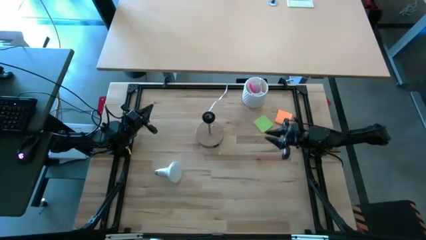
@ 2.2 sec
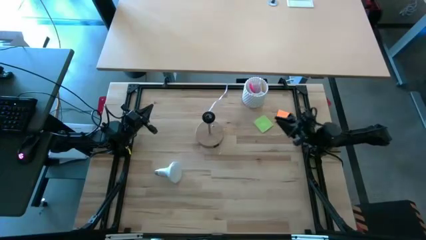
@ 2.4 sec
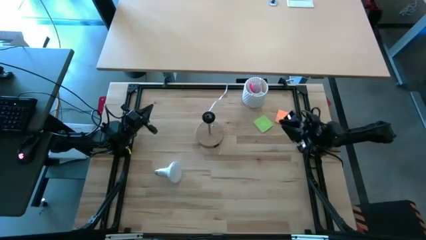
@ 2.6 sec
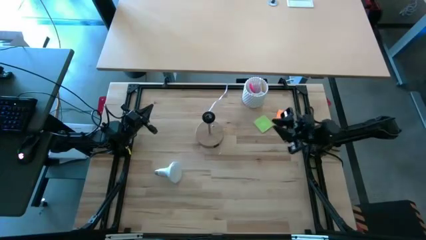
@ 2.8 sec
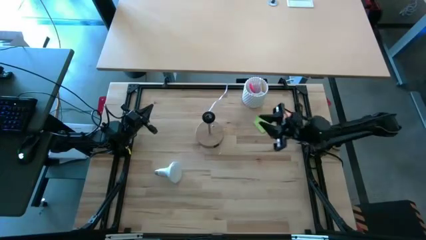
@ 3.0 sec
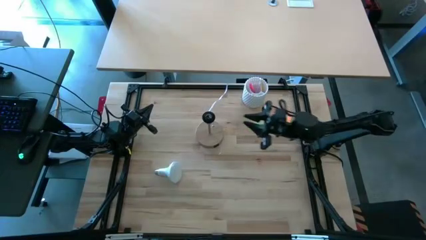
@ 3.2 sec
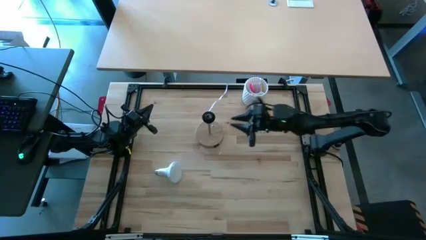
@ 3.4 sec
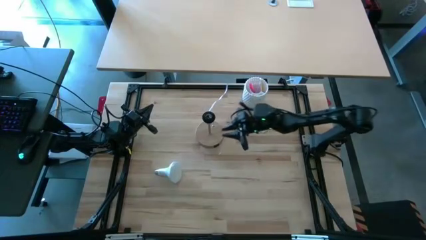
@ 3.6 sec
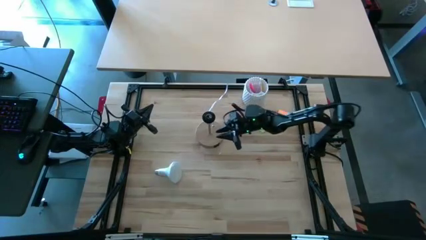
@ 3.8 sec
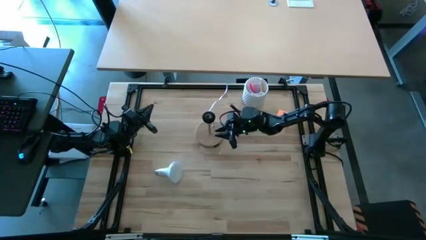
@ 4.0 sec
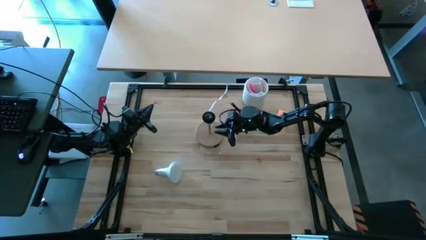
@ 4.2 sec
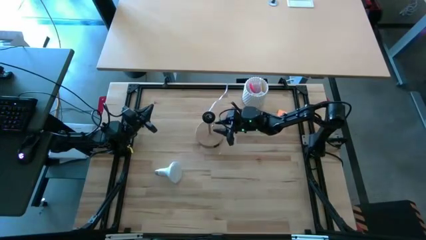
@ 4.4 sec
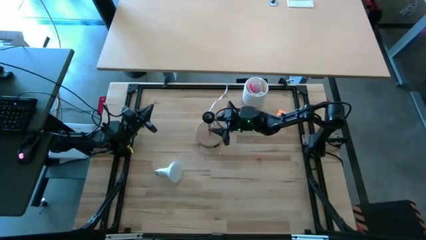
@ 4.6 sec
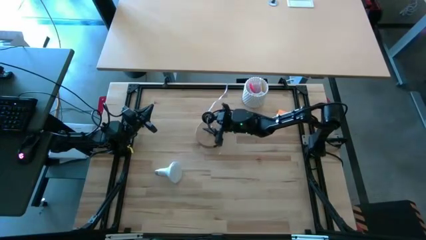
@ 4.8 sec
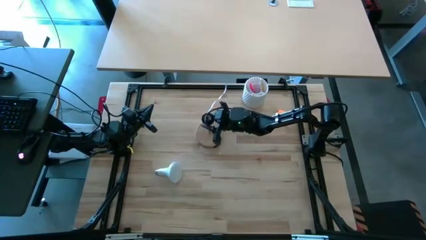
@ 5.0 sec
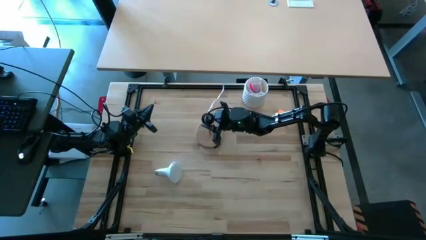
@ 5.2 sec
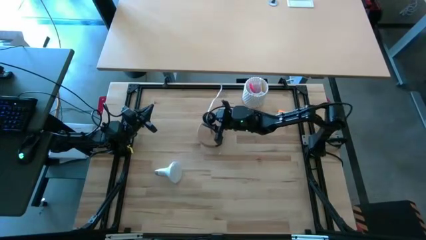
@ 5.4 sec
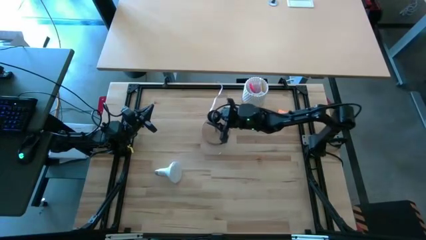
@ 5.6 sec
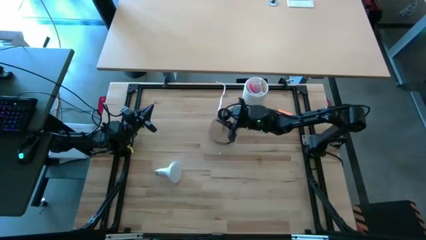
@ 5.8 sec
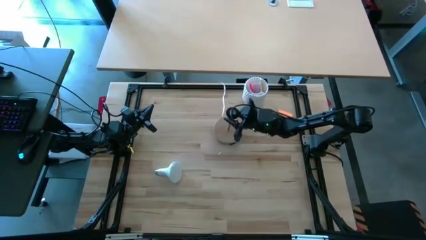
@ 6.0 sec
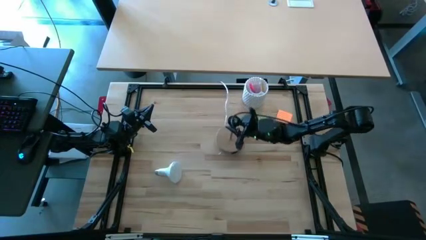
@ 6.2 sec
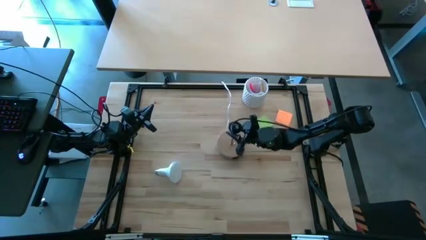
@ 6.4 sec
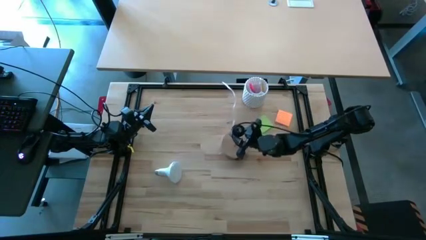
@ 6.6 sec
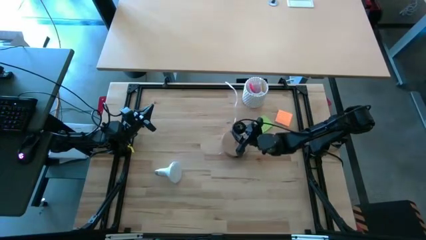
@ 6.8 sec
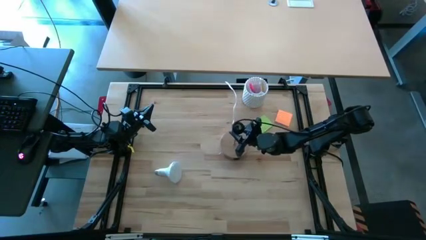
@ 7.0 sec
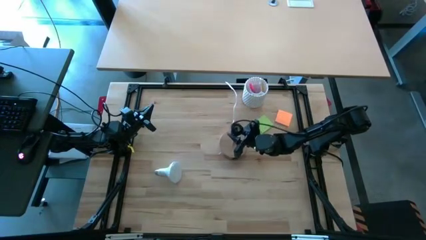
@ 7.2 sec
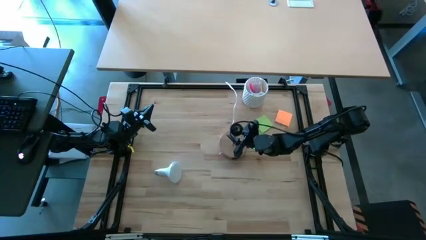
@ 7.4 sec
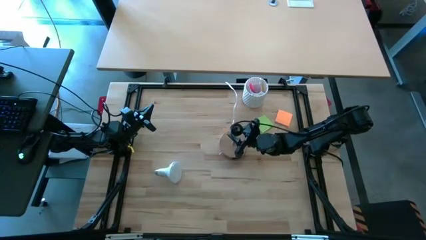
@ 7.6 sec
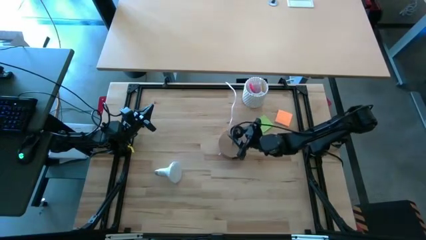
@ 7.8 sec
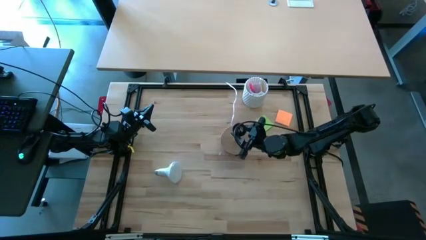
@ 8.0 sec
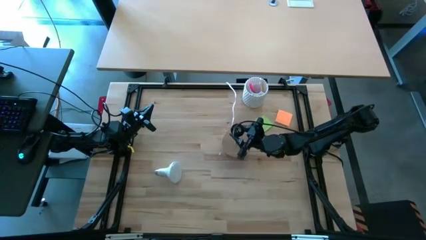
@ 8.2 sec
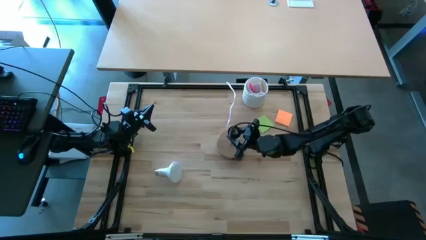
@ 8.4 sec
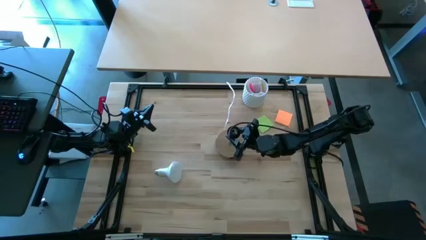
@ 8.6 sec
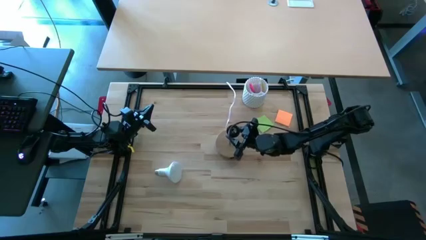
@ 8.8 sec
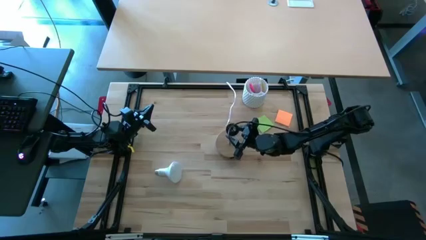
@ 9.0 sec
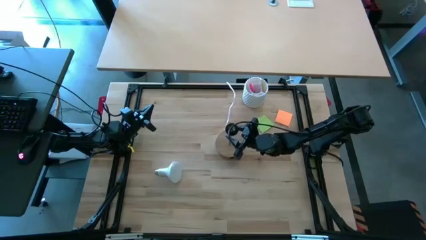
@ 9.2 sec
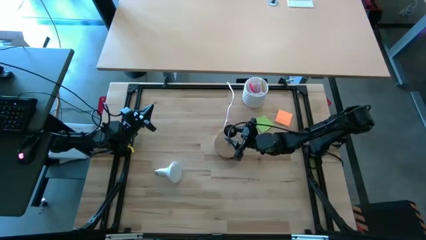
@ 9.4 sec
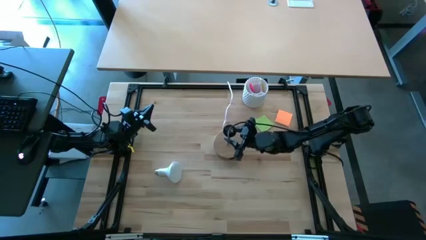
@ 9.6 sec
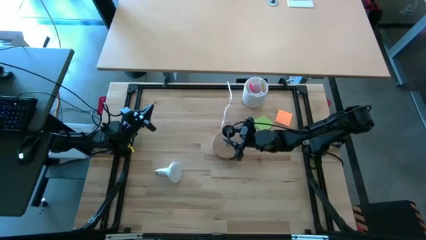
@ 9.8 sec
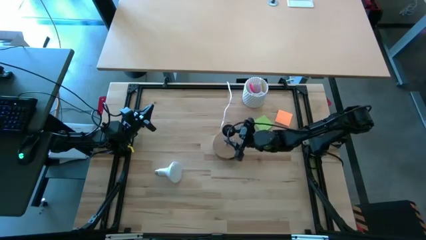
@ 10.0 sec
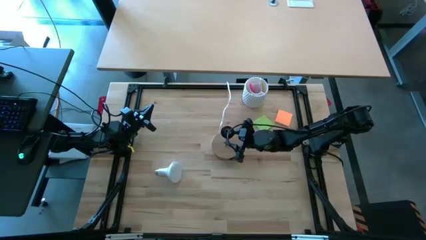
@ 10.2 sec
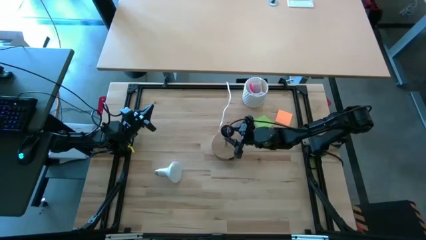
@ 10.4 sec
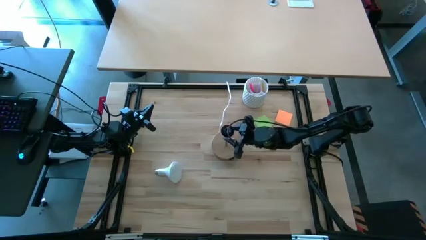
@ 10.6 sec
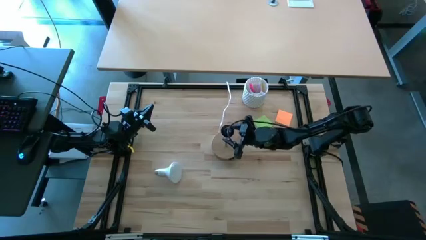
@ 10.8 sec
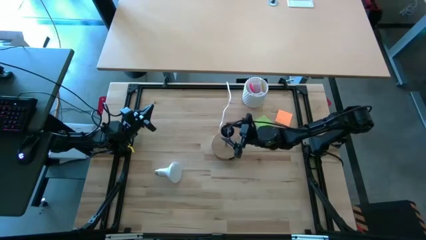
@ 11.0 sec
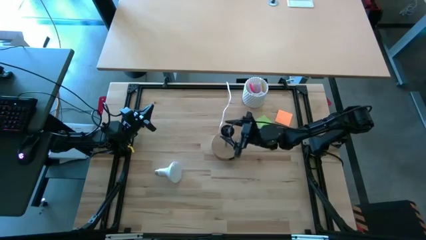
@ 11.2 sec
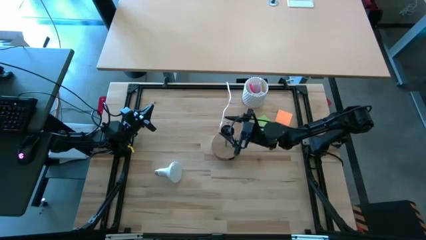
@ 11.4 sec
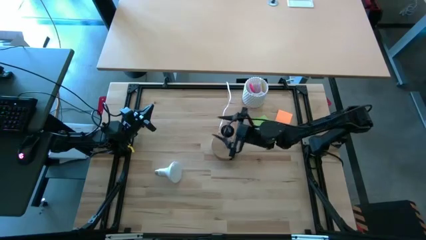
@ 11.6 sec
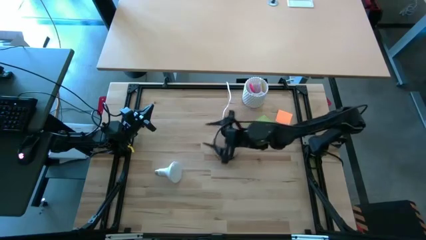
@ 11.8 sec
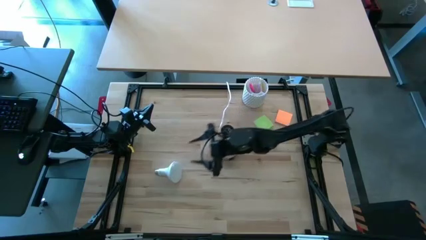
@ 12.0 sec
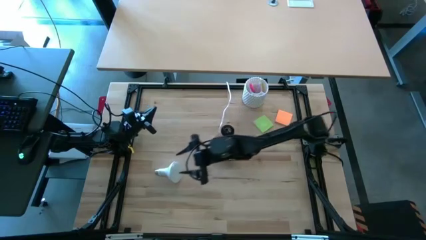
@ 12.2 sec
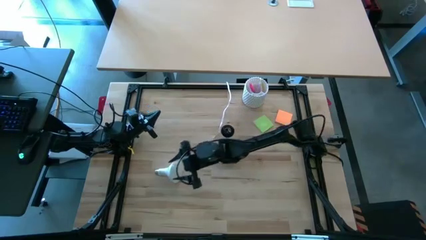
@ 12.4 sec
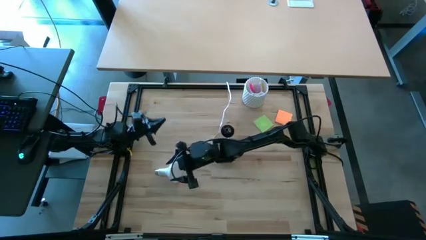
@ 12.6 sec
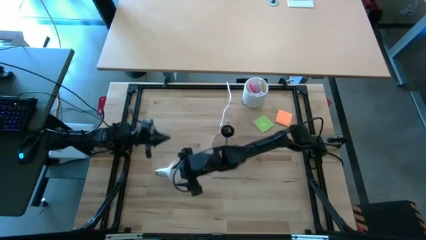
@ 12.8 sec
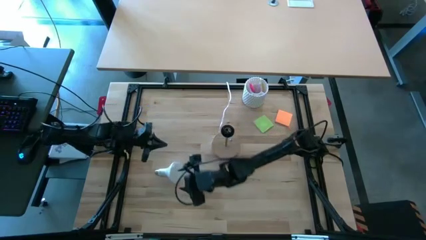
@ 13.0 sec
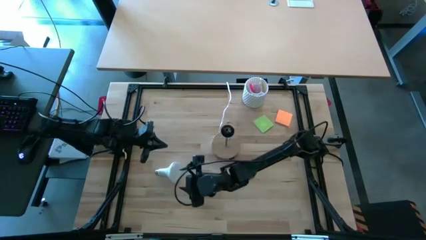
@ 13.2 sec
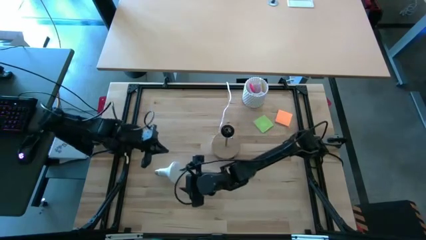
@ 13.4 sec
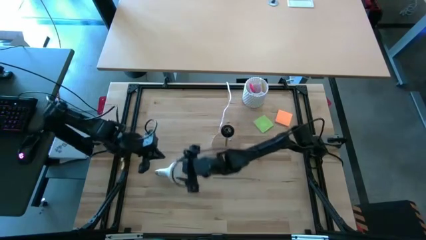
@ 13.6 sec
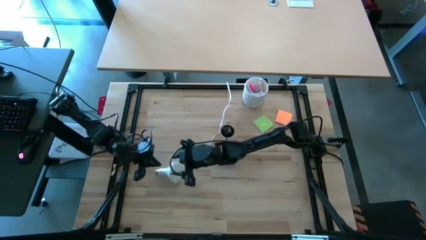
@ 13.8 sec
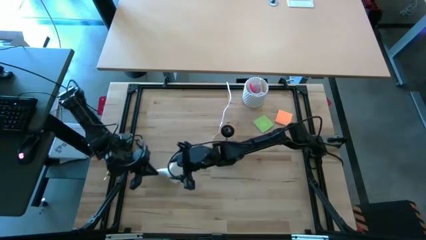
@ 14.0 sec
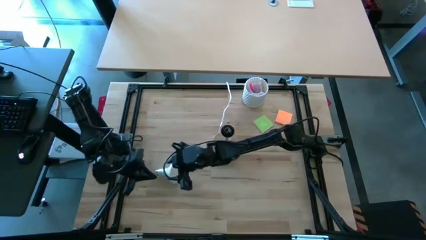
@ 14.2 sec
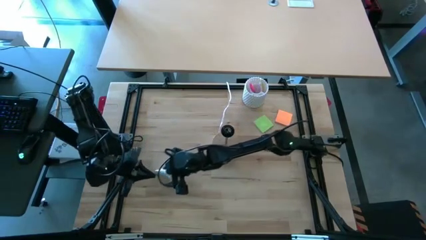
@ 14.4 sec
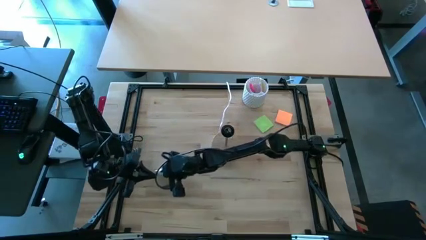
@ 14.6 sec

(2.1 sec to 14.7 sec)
Task: Screw lightbulb
Insert the white lightbulb into the brown lamp

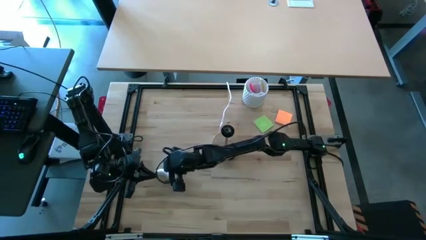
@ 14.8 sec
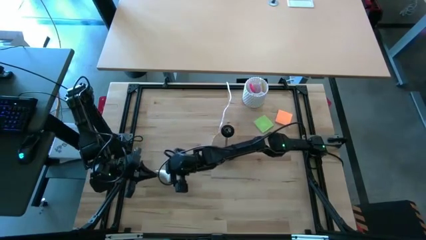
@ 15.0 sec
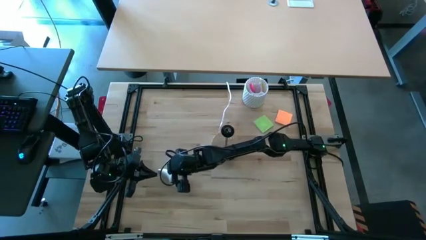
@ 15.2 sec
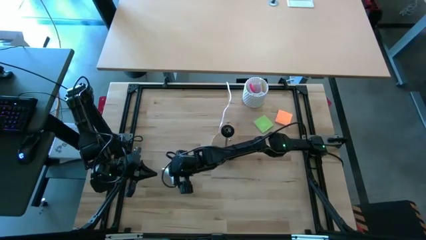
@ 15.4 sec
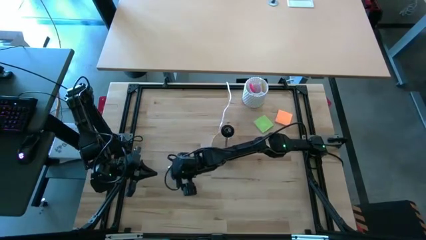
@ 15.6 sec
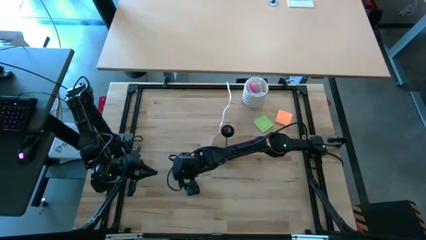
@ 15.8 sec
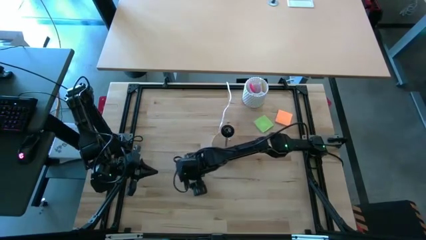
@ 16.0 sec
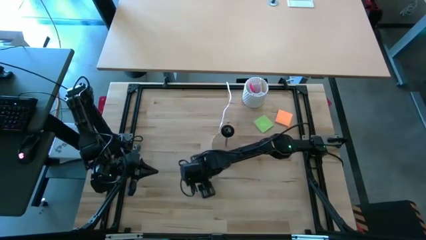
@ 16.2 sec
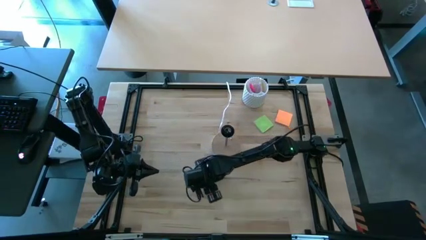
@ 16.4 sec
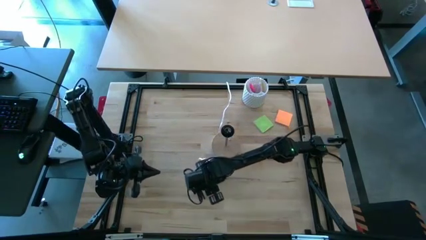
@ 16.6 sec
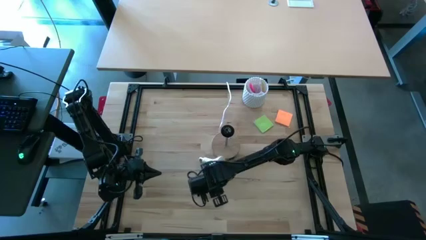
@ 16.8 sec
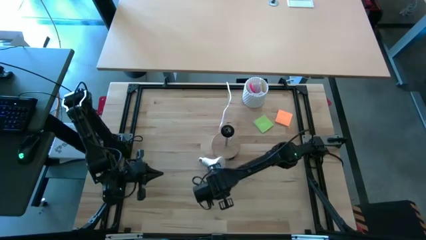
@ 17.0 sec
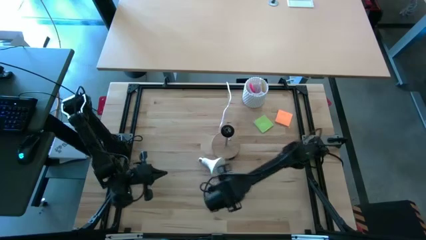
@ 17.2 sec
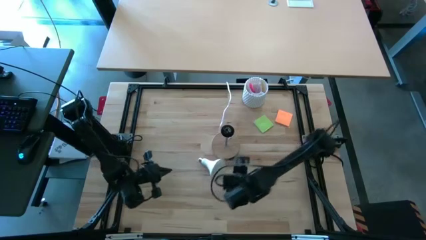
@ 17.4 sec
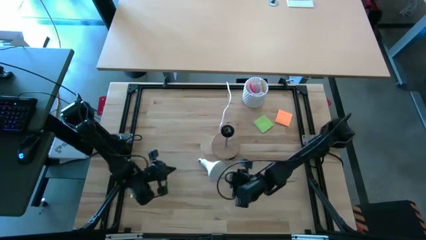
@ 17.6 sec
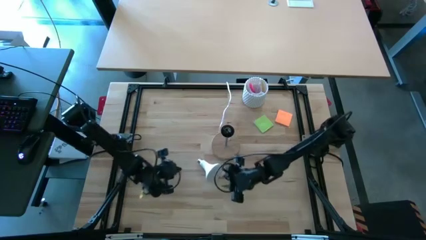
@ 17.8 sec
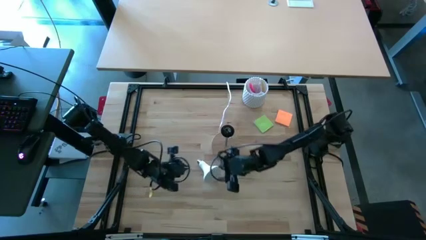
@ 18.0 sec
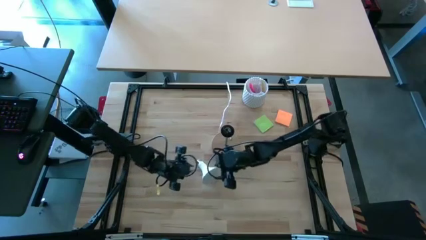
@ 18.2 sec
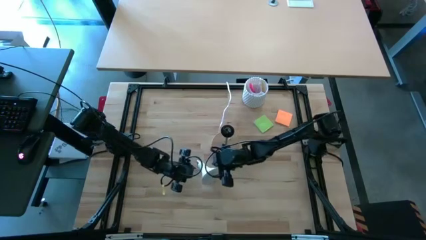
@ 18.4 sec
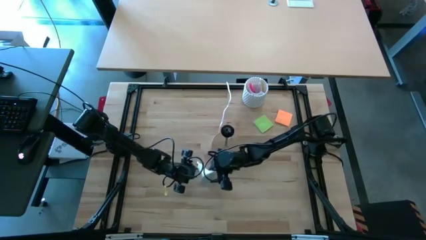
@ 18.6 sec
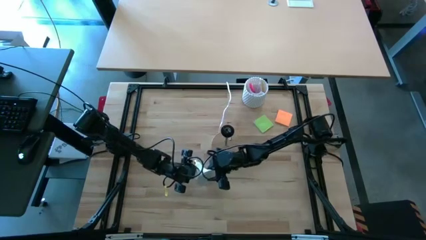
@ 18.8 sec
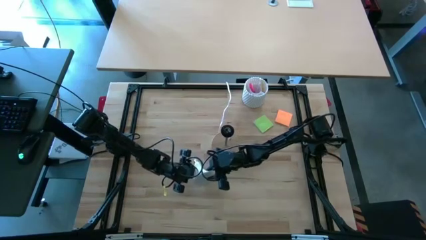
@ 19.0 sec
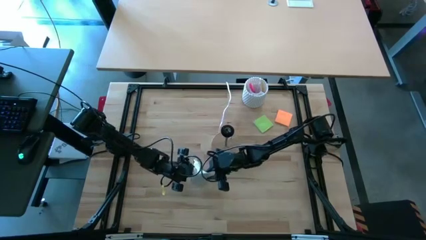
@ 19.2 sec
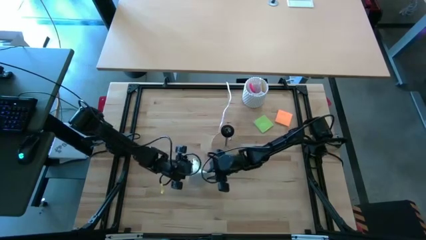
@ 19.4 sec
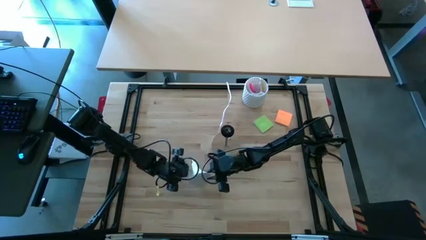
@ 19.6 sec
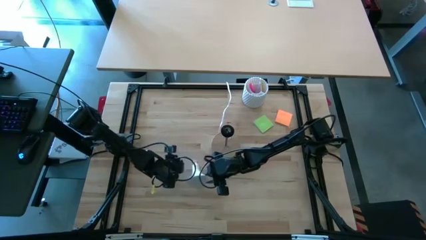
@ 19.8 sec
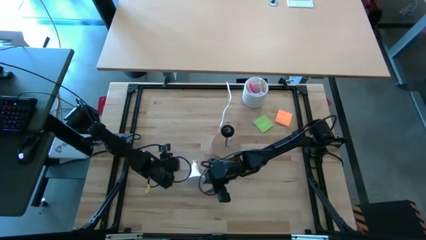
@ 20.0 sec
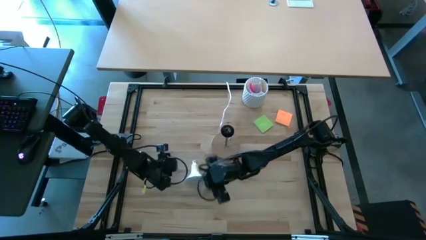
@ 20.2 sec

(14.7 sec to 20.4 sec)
Insert the white lightbulb into the brown lamp
